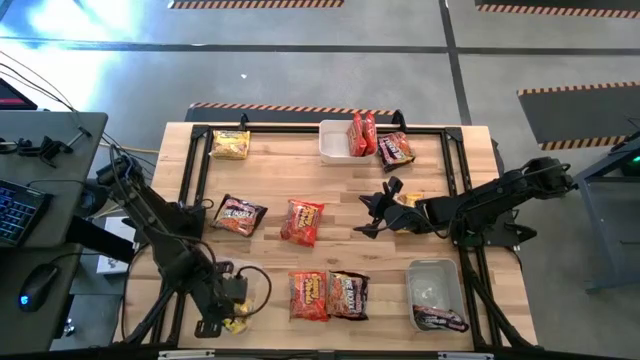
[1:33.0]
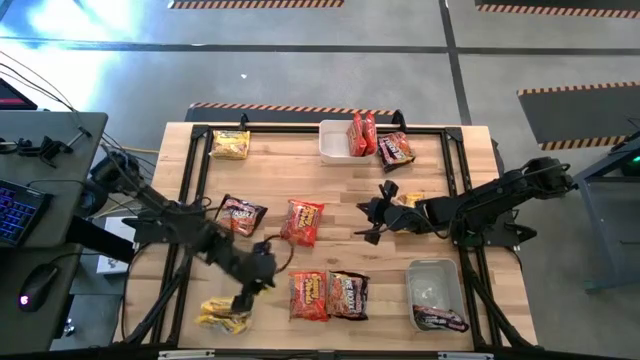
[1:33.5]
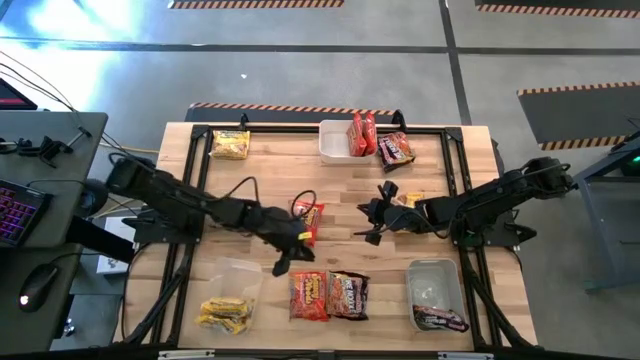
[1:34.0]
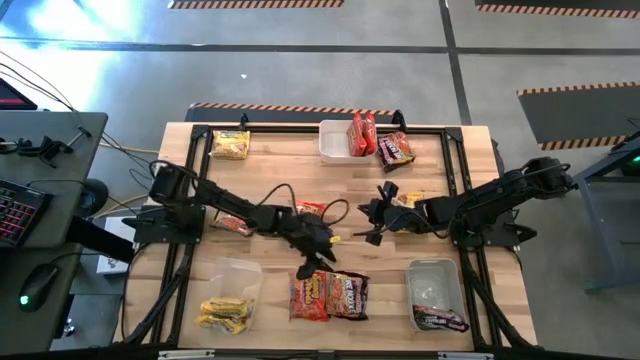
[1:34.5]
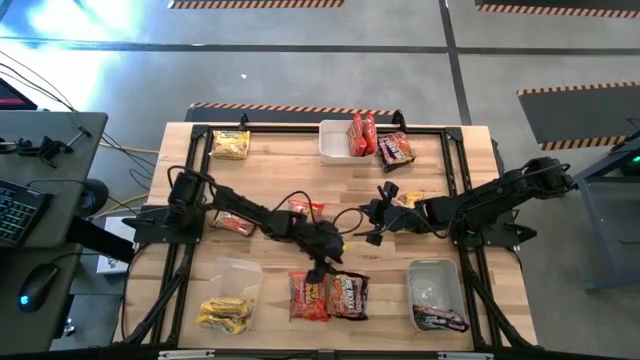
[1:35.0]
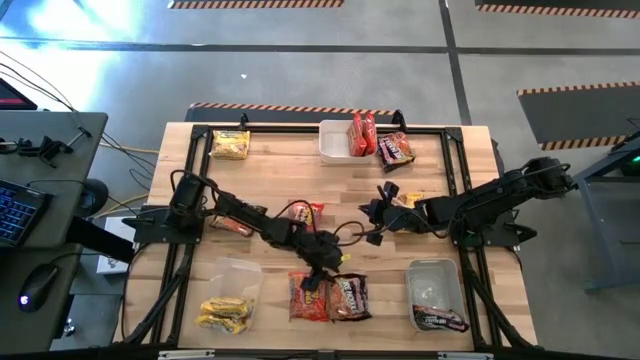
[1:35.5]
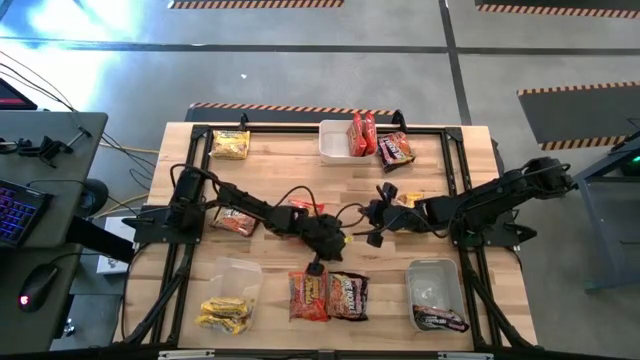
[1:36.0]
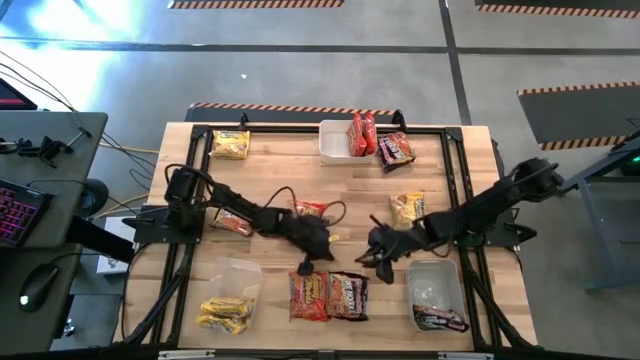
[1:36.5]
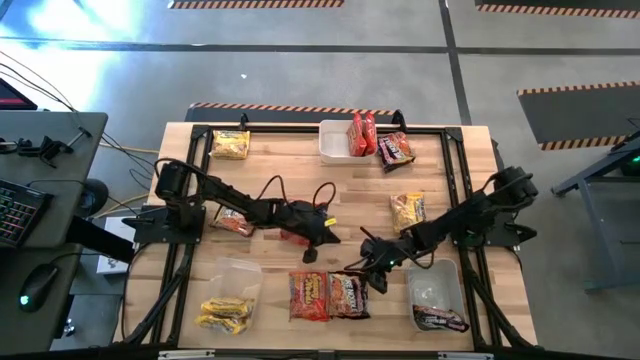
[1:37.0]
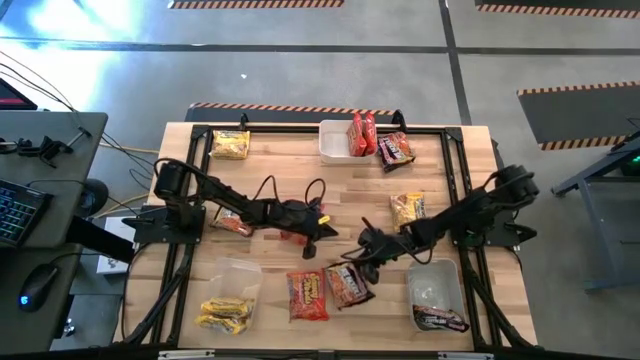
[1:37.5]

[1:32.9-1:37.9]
Task: Sort Maruchan noodles
Put the black noodle pack into the gray bin

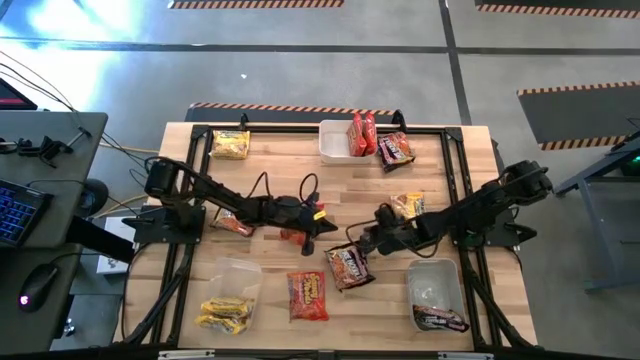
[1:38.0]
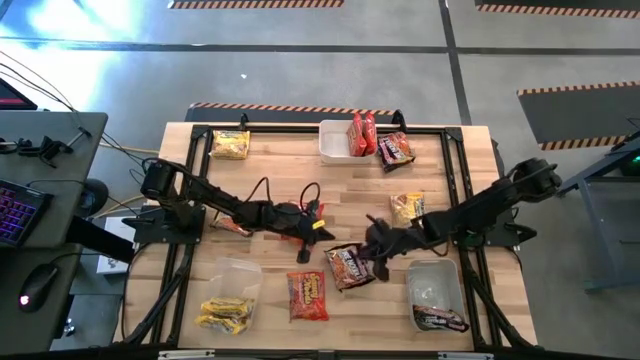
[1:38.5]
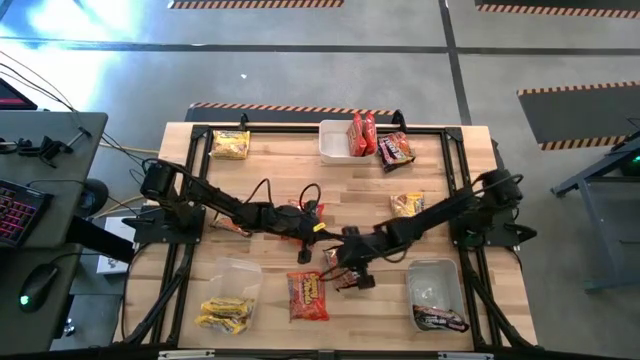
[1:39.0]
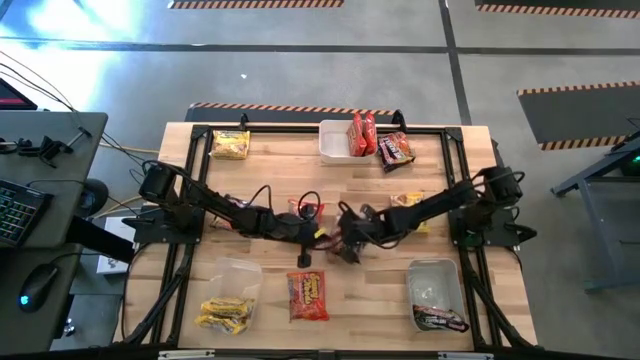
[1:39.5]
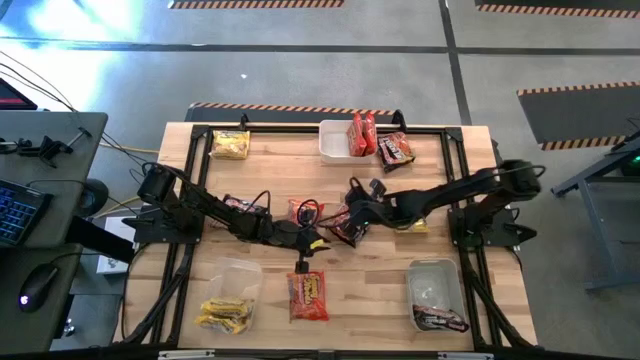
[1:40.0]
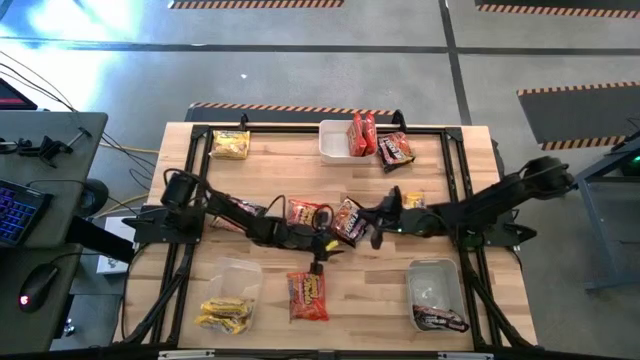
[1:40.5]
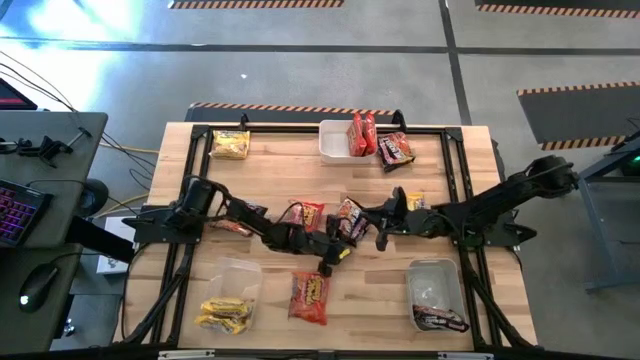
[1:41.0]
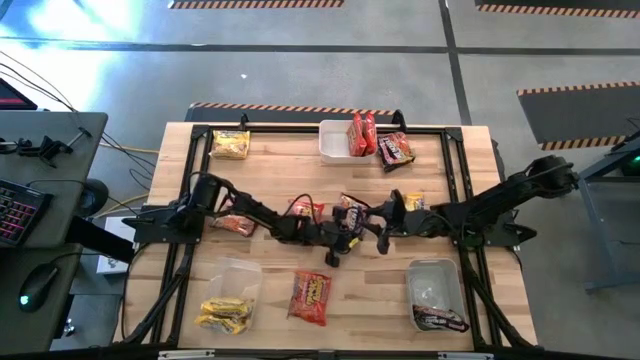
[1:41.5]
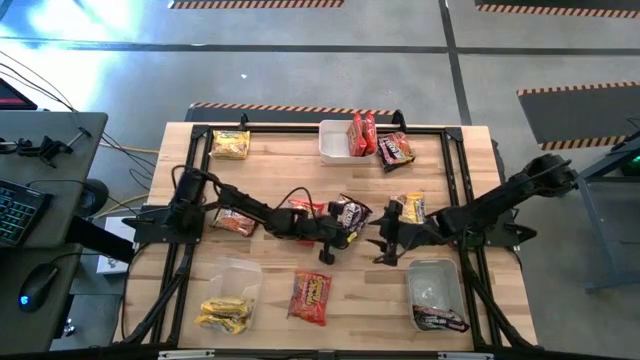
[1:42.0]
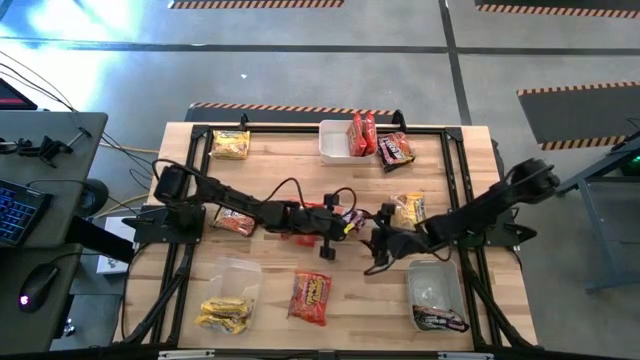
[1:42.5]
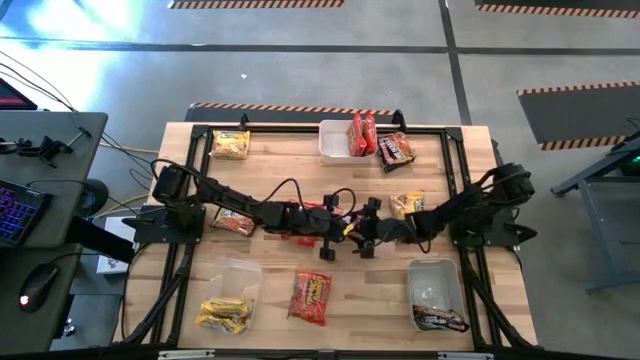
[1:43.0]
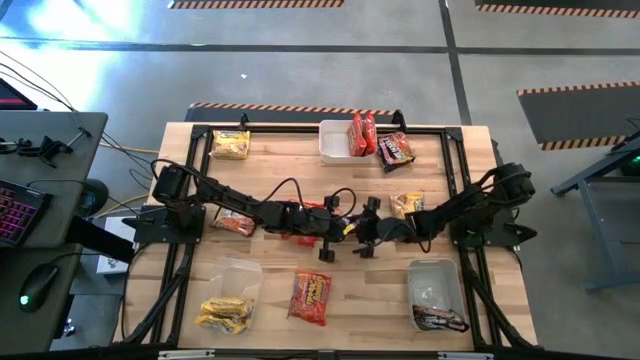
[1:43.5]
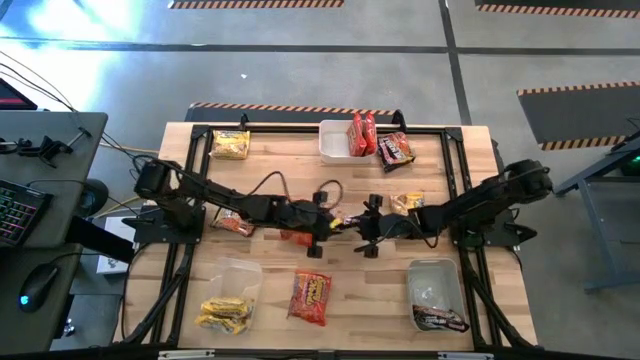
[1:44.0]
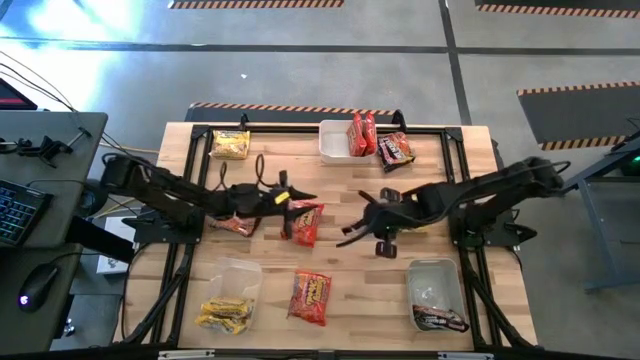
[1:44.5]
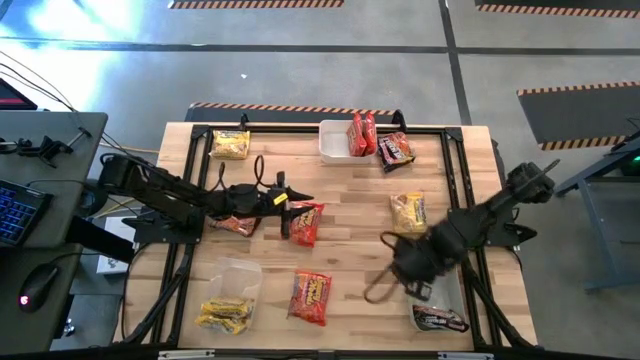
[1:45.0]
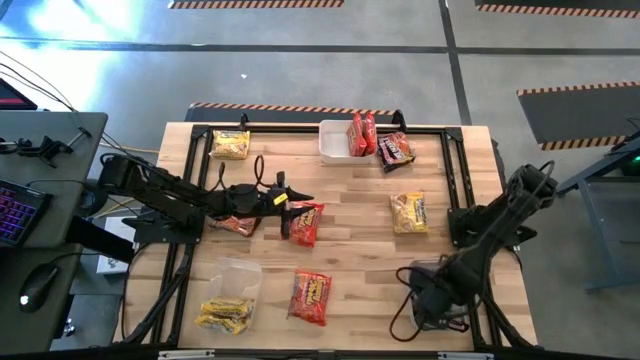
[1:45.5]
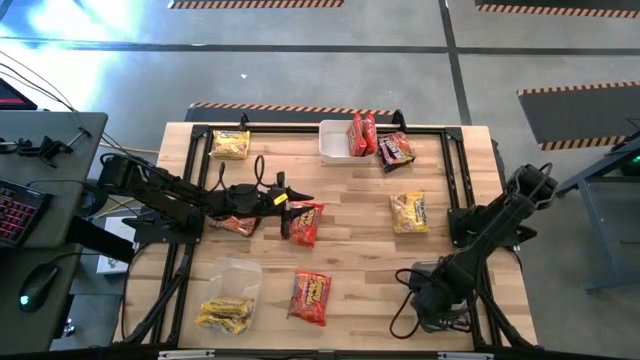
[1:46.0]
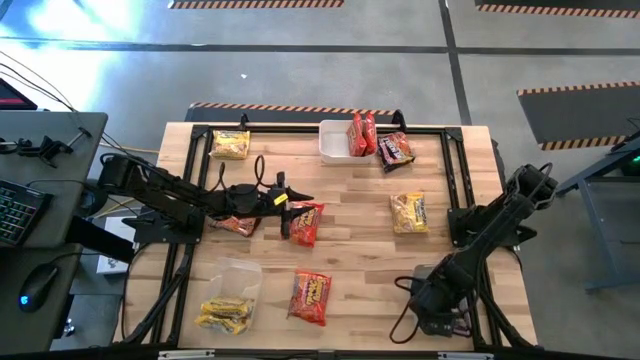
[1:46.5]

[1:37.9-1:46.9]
Put the black noodle pack into the gray bin

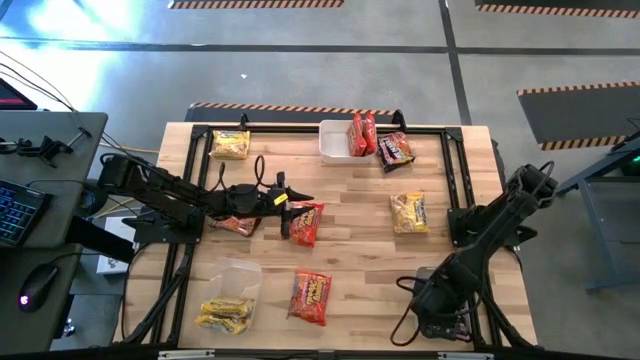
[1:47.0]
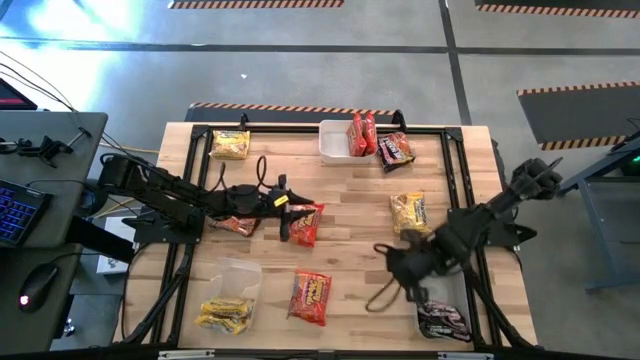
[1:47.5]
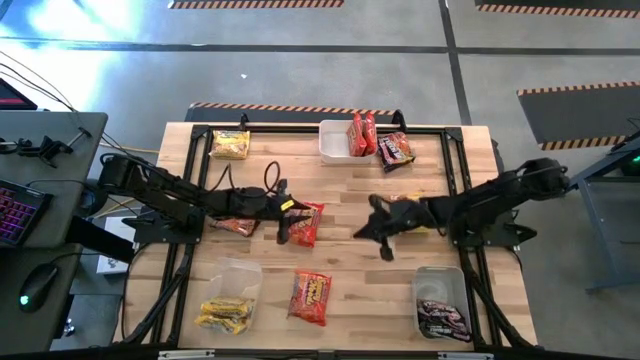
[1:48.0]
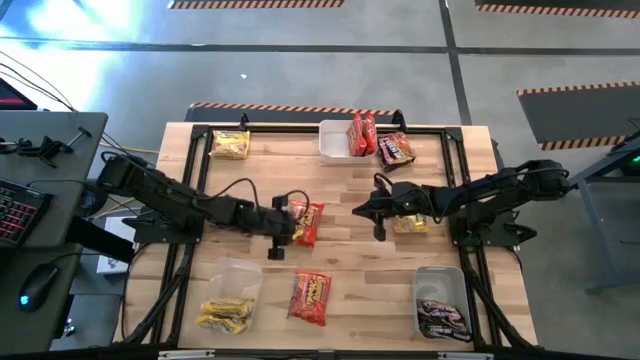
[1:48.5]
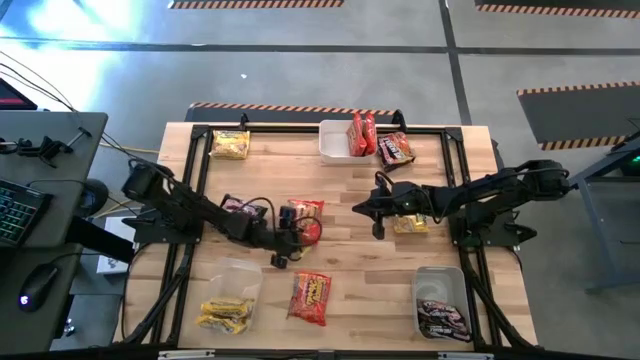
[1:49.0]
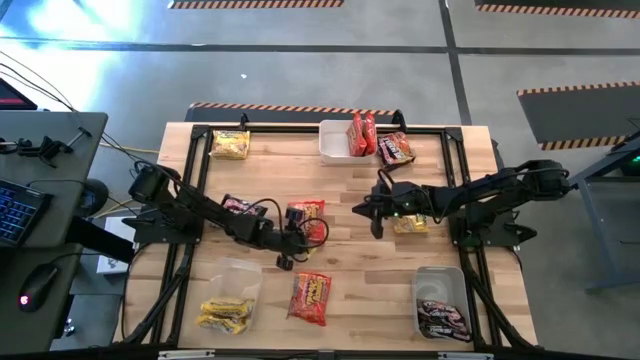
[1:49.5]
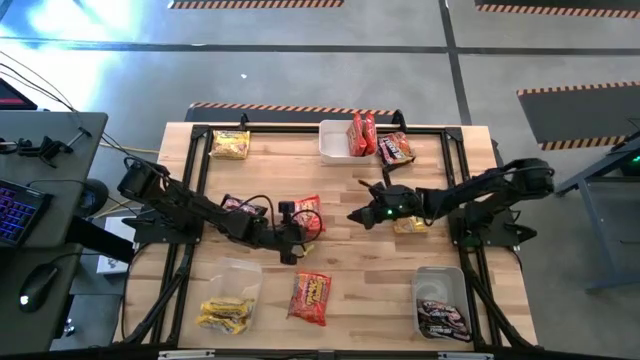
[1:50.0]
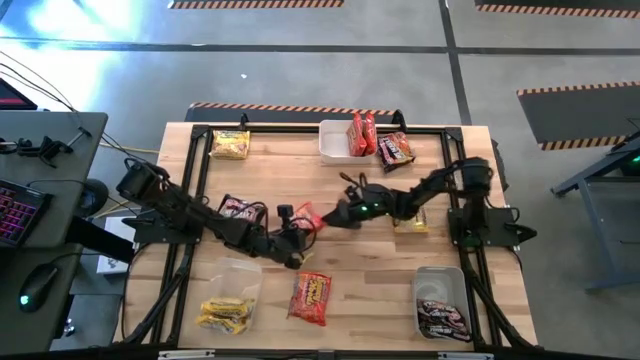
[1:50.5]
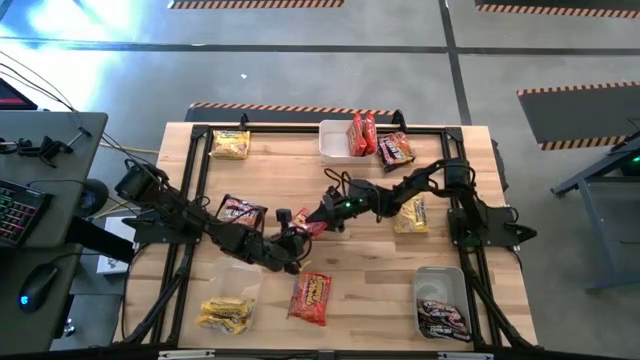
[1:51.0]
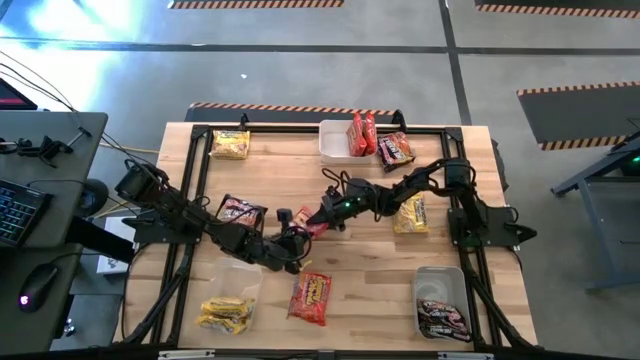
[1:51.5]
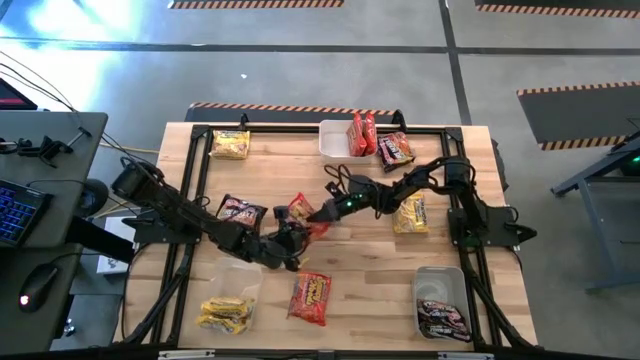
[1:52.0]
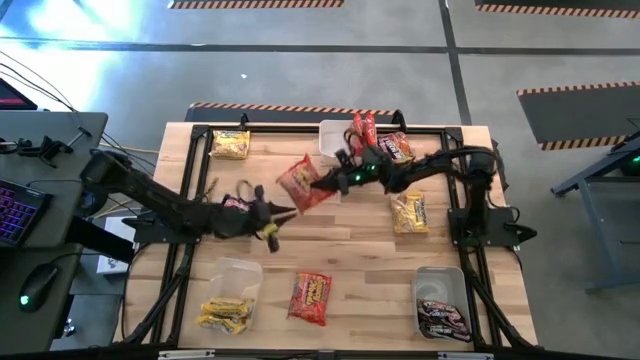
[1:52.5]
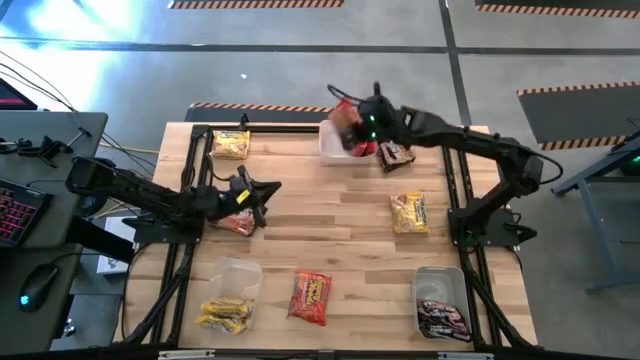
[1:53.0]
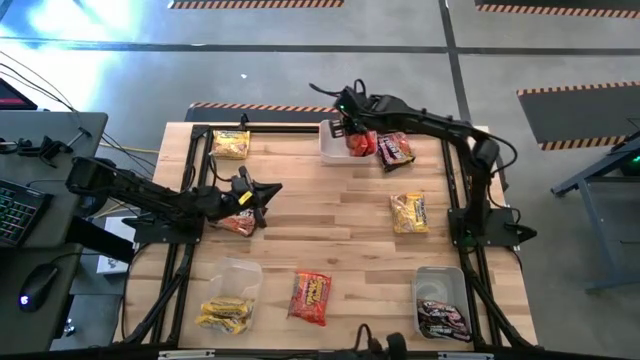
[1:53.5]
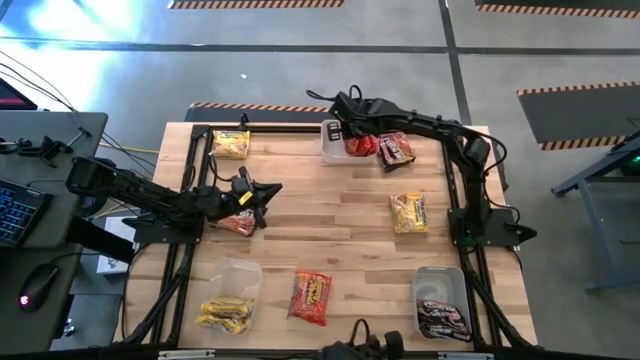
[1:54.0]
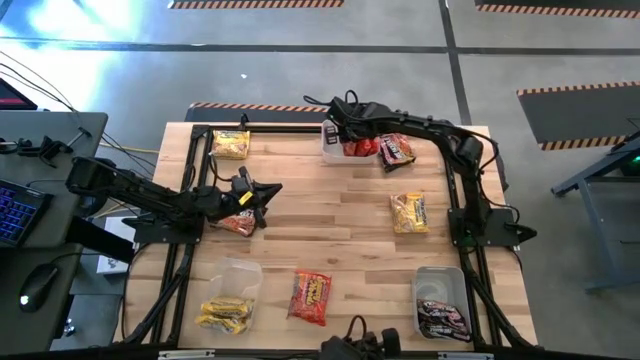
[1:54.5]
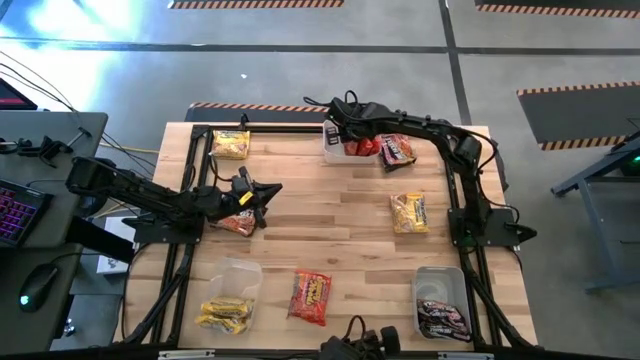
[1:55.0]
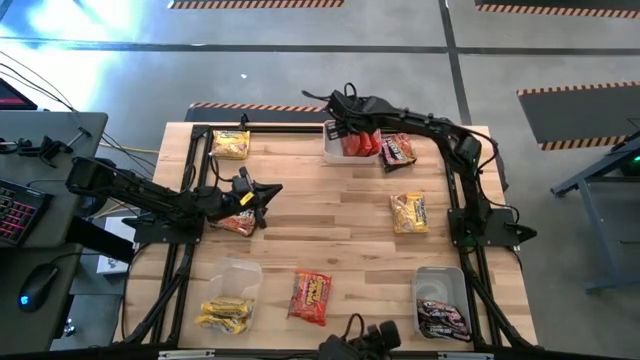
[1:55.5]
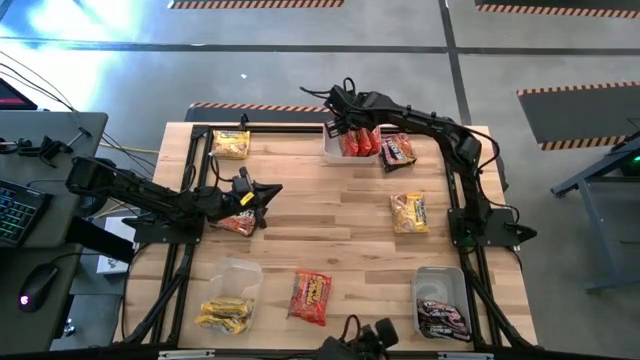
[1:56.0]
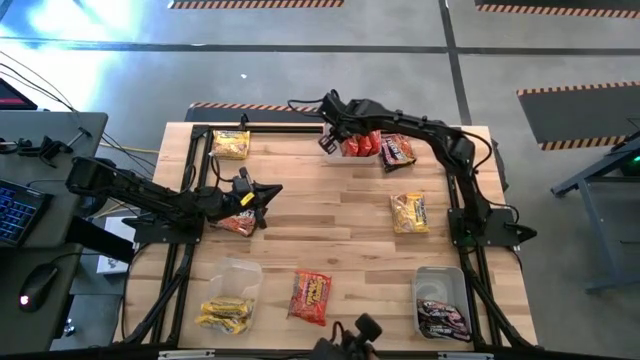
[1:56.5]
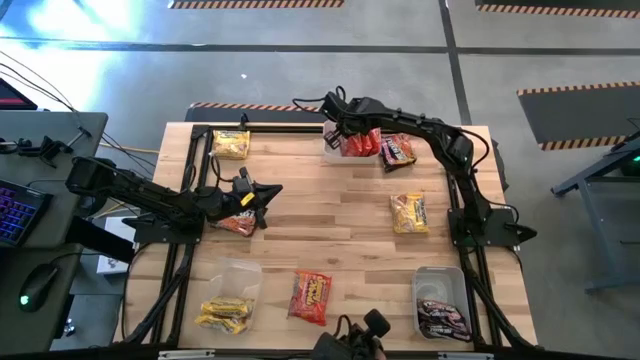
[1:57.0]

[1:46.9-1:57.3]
Put the orange noodle pack into the white bin
